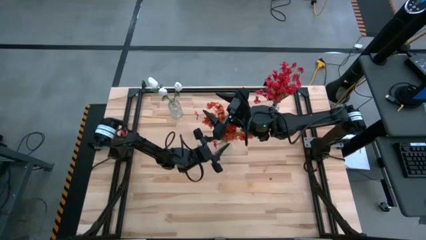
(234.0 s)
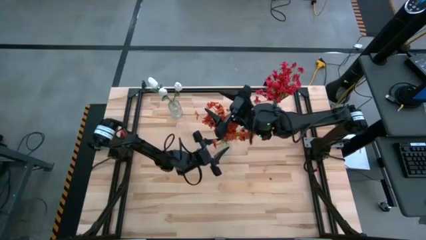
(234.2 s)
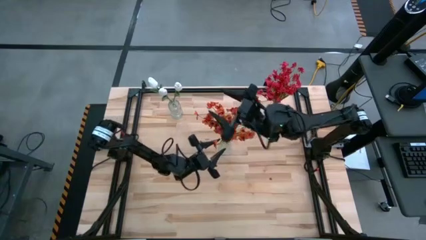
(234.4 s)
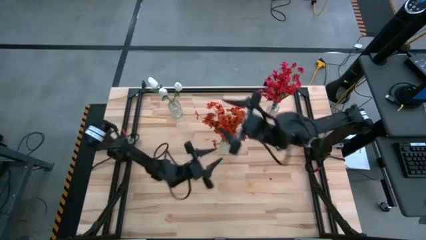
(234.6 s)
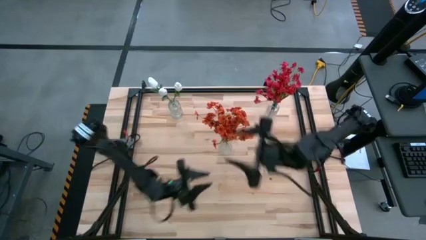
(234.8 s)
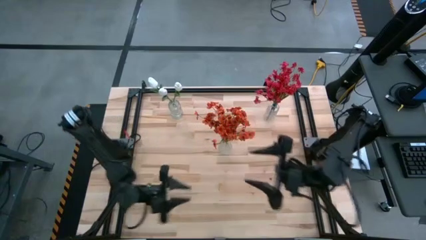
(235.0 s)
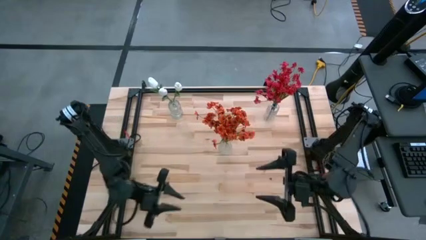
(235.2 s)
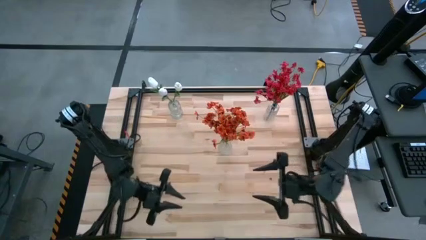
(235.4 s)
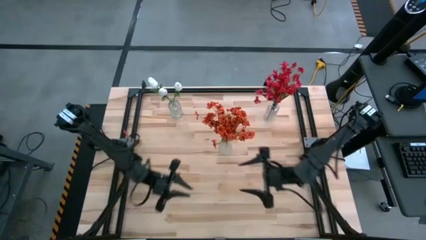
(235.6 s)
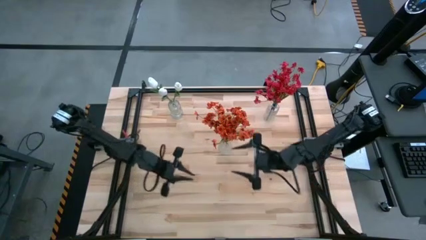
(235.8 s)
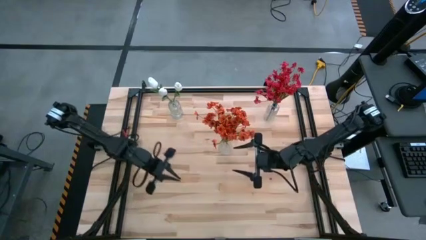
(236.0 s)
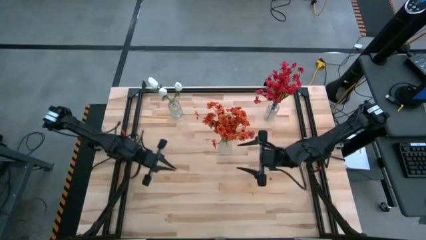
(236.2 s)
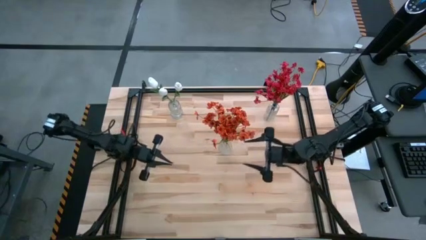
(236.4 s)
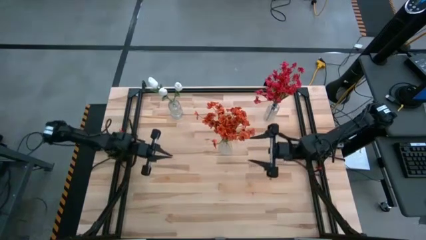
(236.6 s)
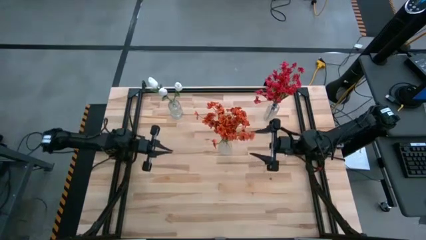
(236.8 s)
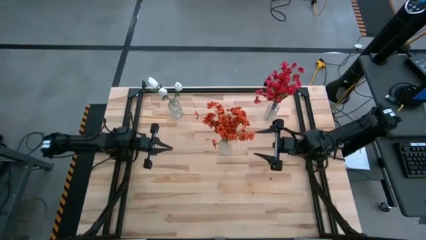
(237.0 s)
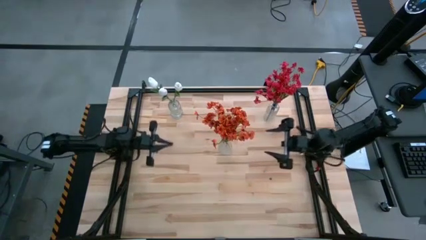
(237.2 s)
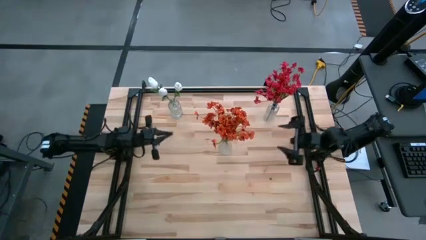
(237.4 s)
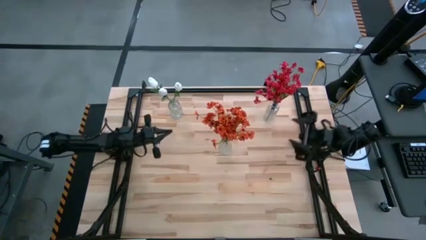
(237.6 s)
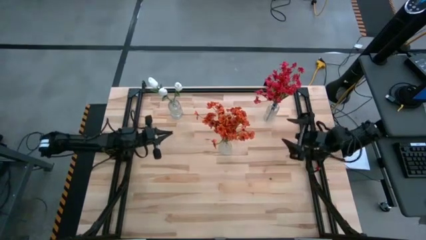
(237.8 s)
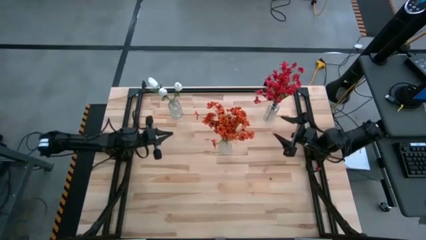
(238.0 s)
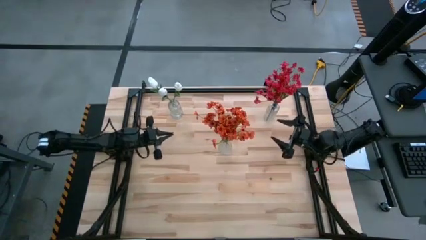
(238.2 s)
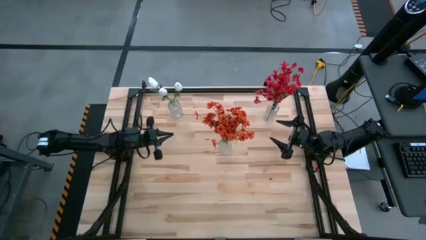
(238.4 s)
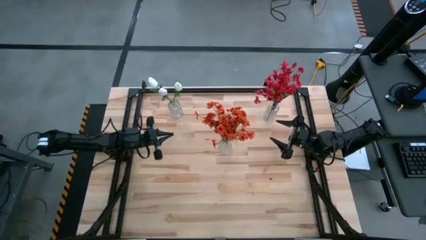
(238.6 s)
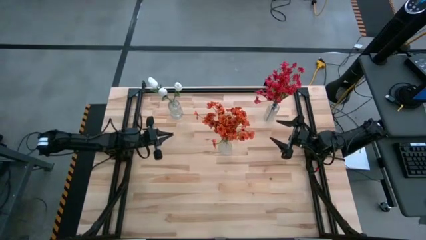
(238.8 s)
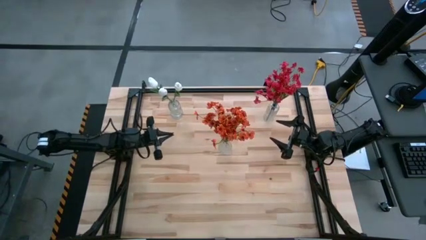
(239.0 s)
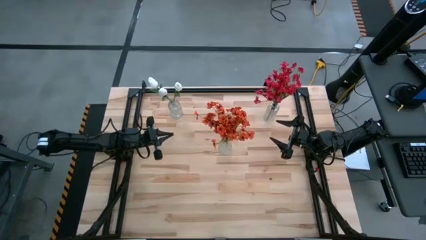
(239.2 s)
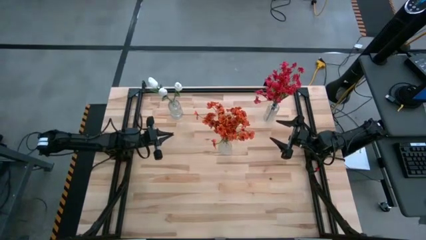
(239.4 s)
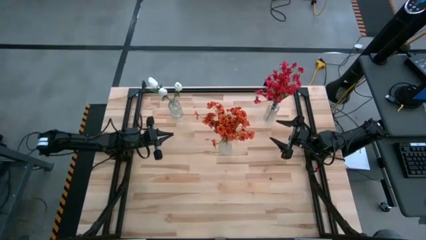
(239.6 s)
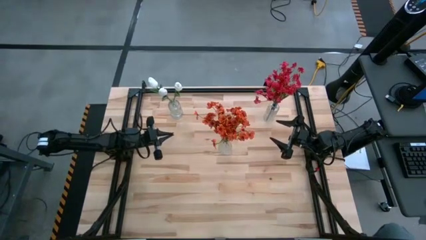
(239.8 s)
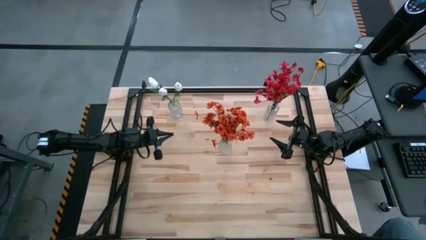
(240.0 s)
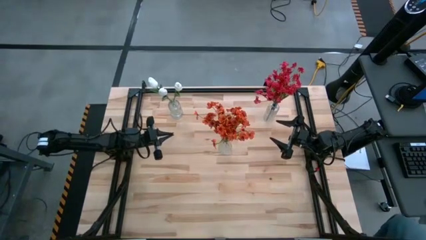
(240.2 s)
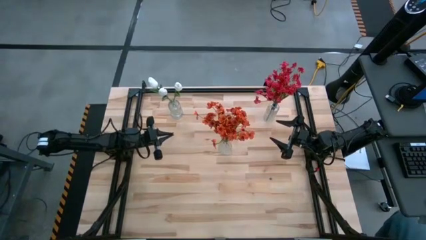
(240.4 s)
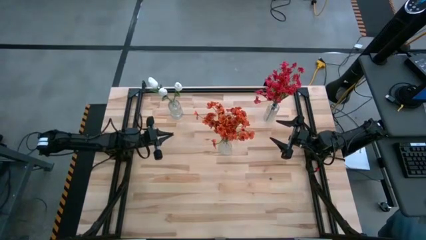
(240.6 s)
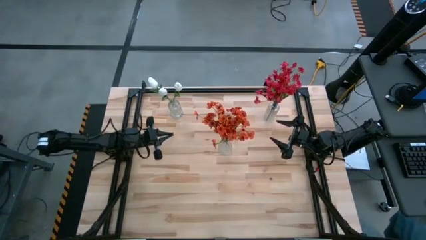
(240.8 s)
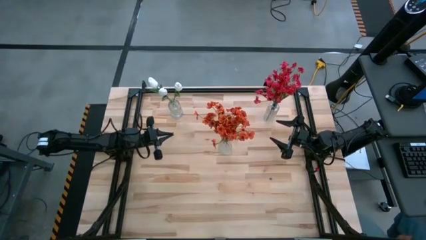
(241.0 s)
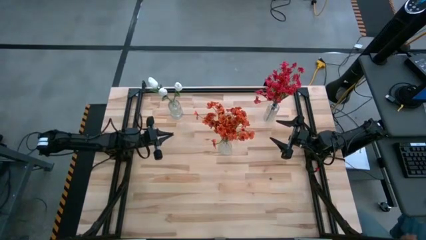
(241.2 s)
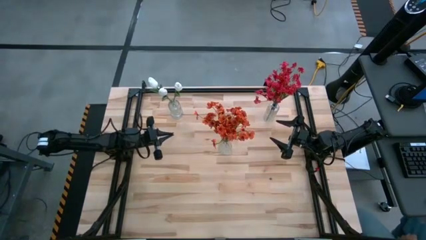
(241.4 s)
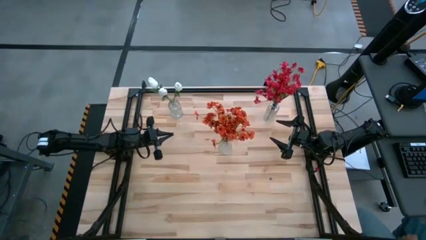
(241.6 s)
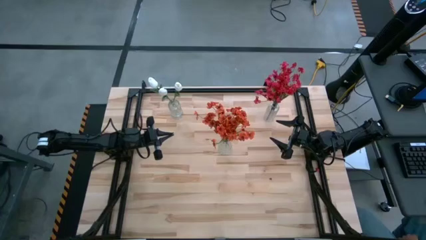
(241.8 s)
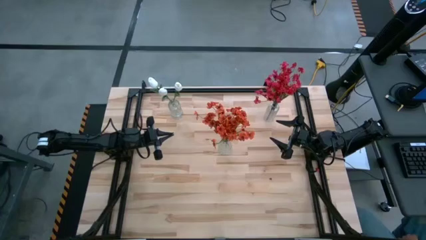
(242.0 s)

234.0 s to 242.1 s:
Task: Sort flowers into vase by color
Return to Home Position

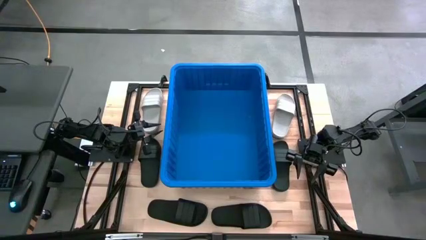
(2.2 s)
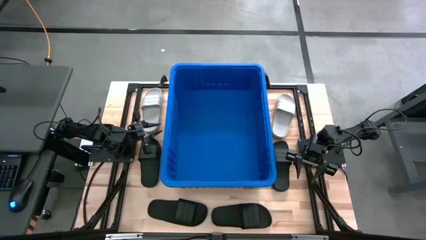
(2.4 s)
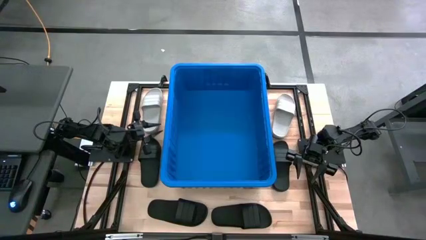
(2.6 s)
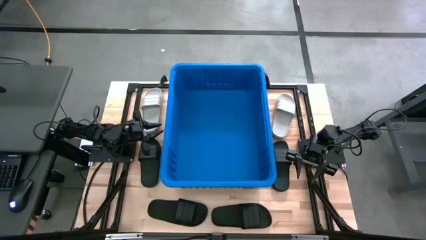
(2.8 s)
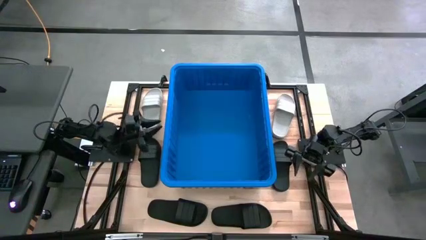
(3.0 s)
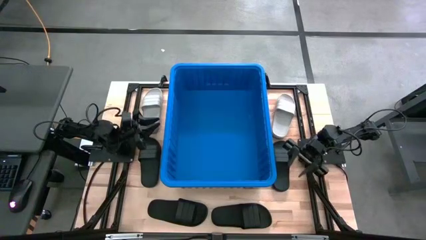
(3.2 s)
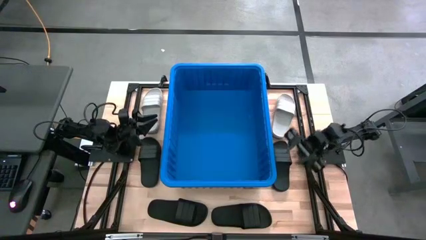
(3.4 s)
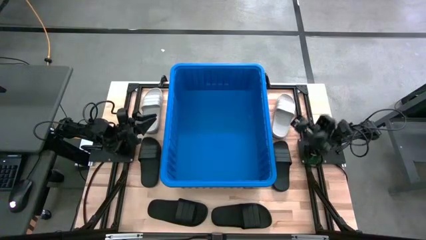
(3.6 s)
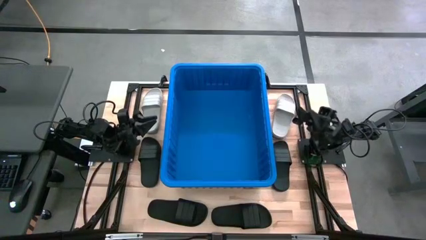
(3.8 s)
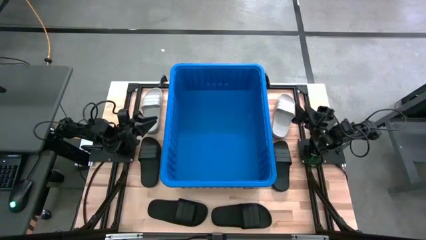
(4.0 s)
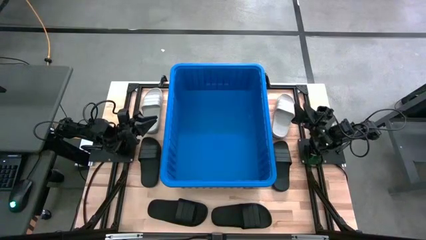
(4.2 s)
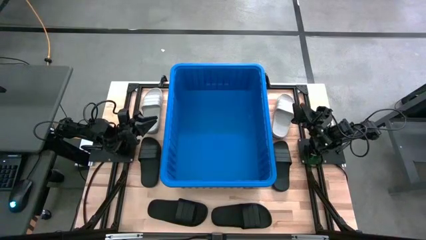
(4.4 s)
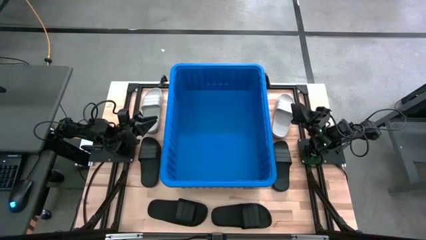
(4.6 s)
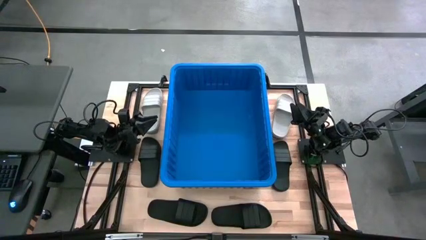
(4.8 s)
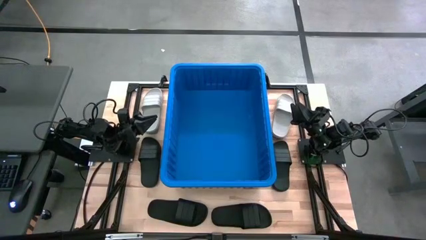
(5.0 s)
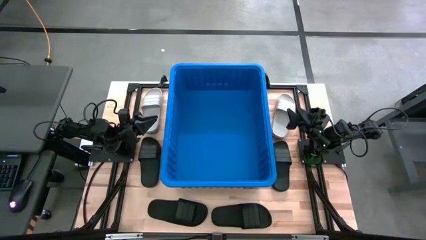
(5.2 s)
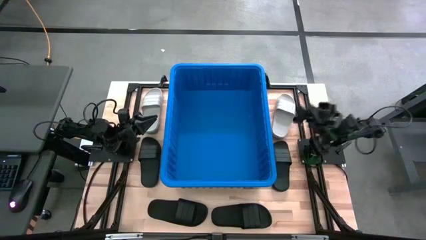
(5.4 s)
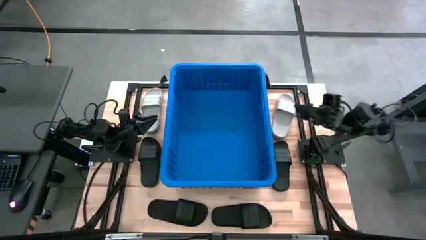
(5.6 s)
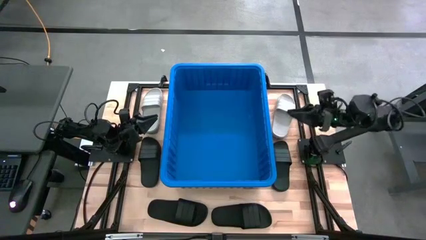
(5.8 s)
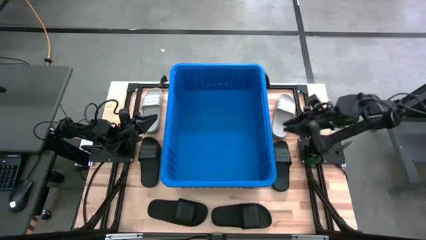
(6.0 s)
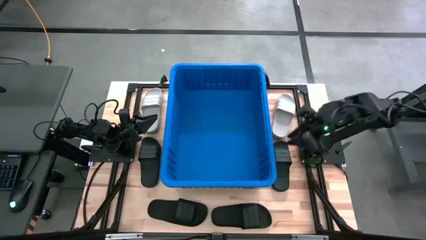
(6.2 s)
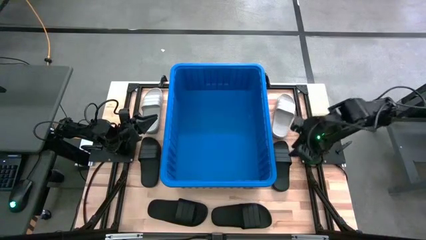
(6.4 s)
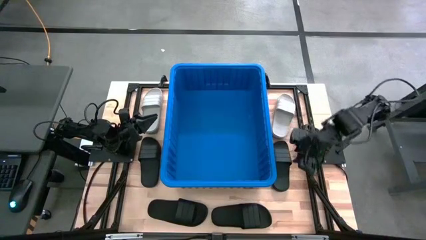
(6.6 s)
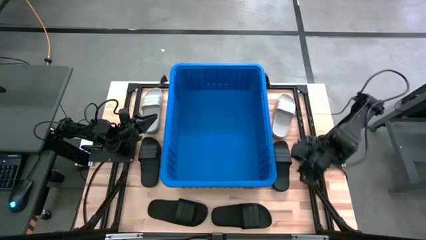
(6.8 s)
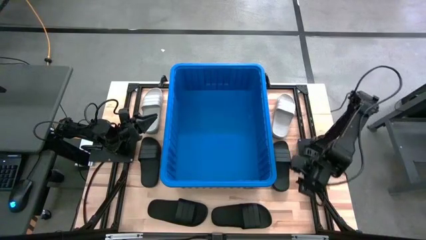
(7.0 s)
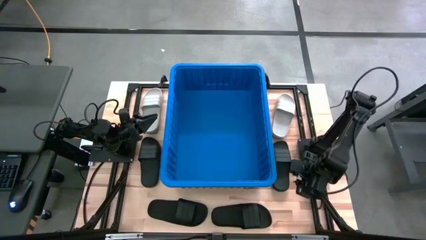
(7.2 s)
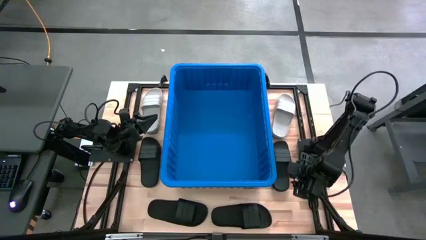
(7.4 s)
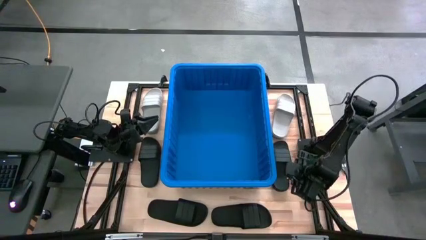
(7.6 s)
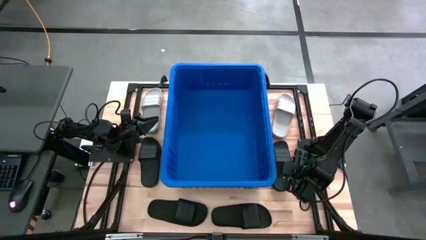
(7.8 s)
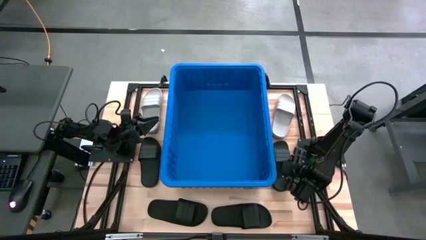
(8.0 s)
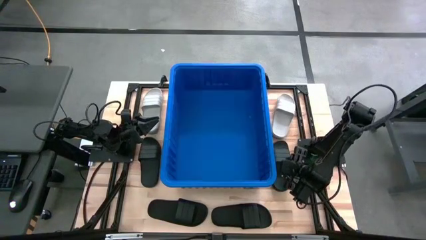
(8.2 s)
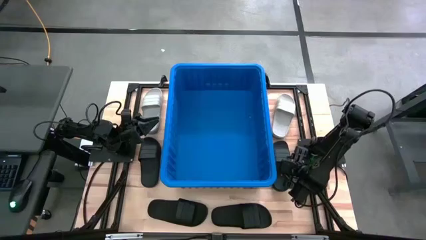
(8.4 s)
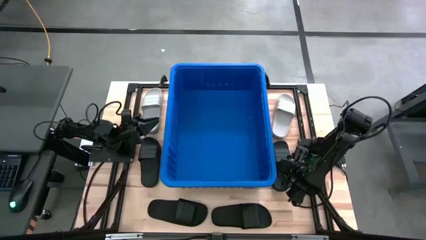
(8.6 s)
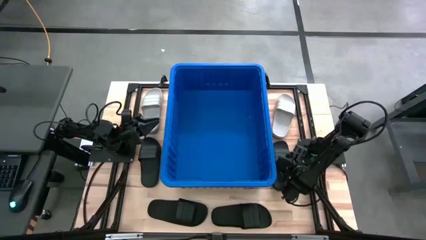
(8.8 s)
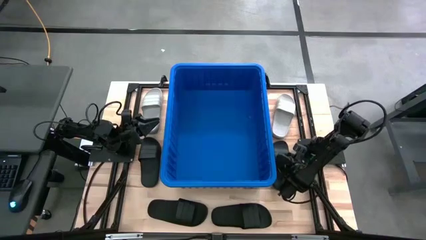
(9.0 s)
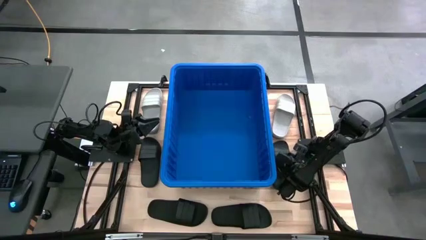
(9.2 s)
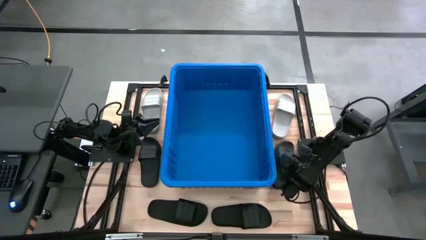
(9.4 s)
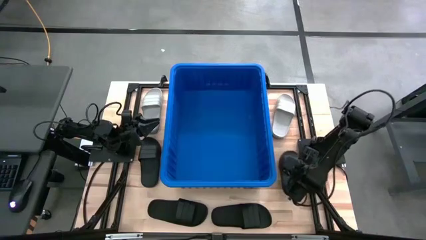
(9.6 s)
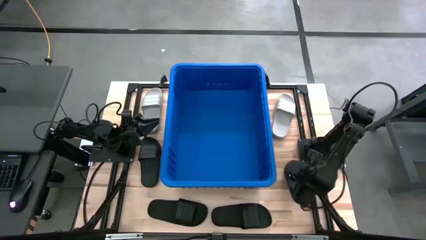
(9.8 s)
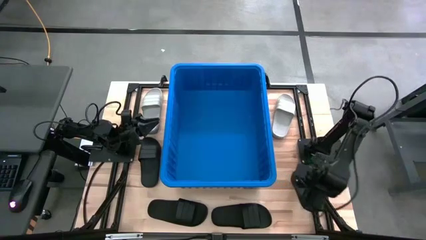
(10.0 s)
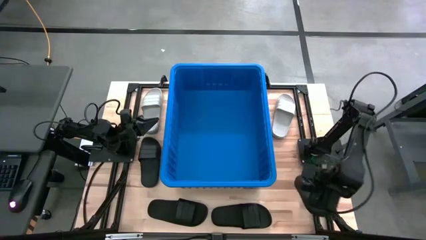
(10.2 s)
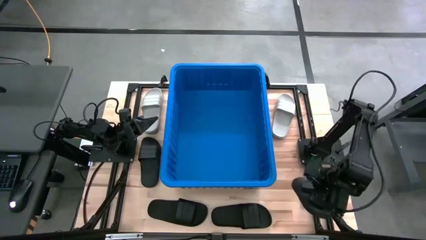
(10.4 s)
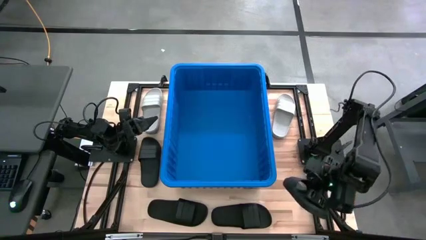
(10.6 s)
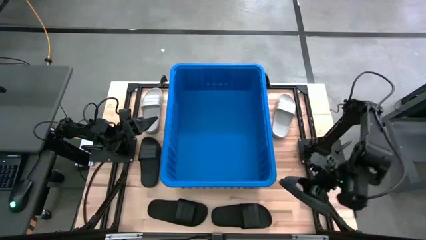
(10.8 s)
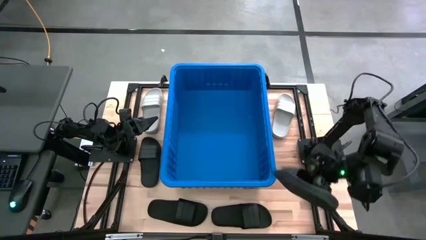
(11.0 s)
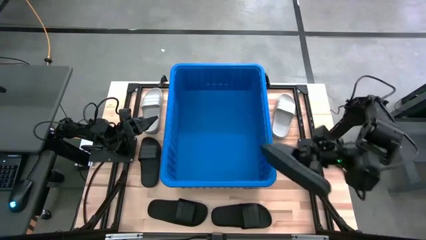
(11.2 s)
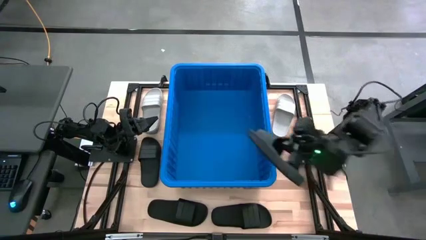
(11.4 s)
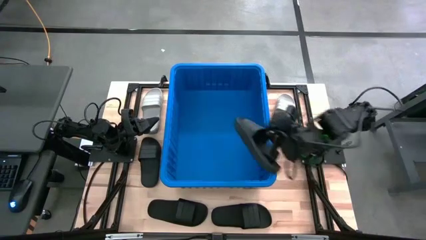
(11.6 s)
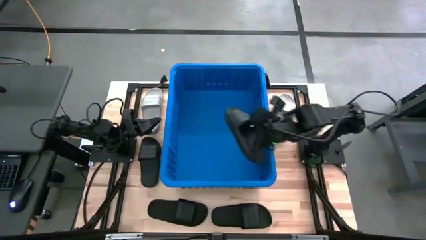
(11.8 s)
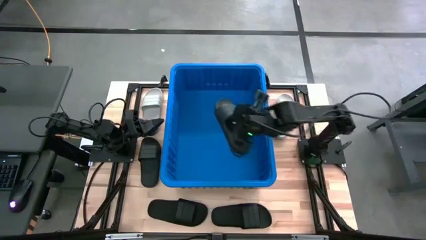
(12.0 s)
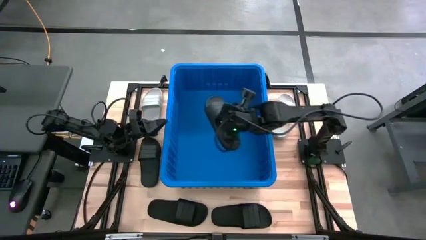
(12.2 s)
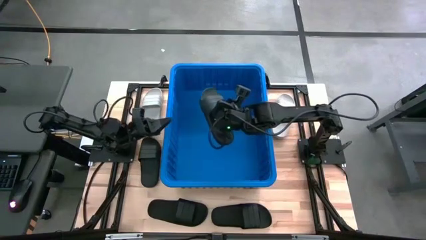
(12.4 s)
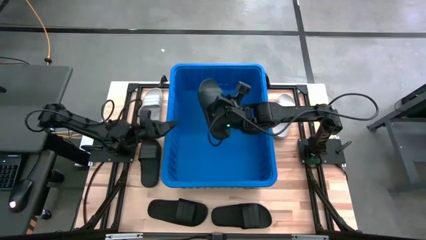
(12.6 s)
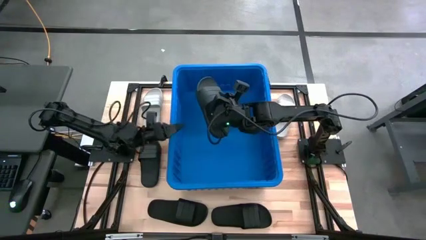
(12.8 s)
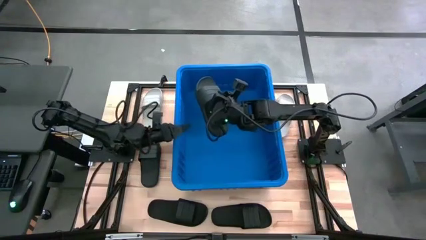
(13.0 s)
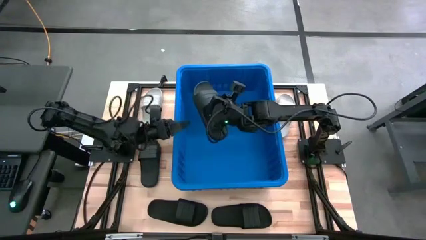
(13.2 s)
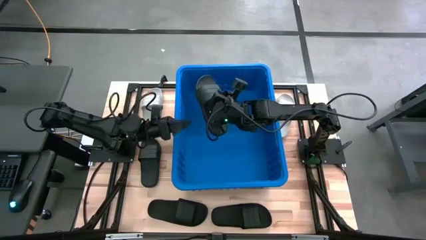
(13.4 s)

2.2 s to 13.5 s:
Task: Pick and place slides into bin
Put the black slipper into the bin
